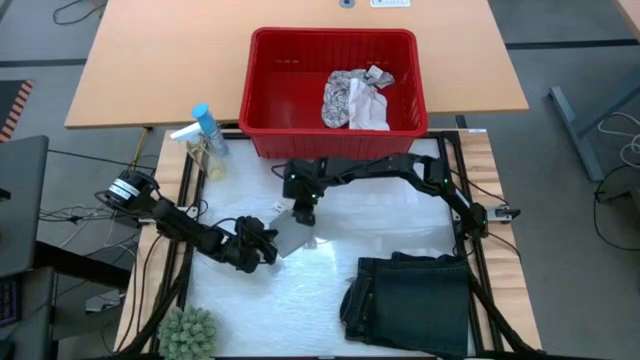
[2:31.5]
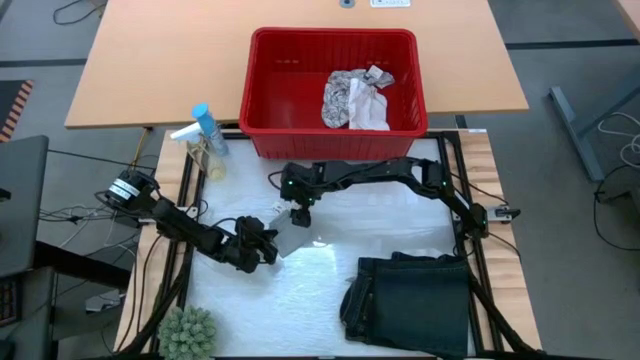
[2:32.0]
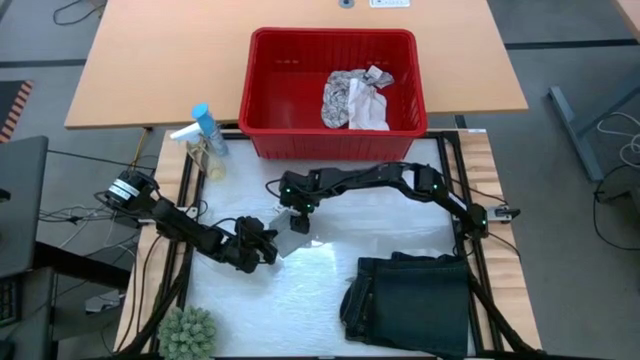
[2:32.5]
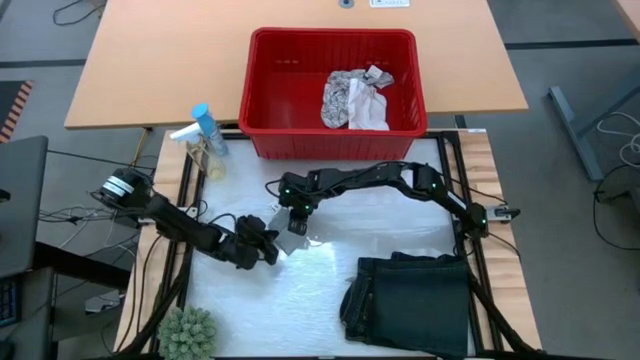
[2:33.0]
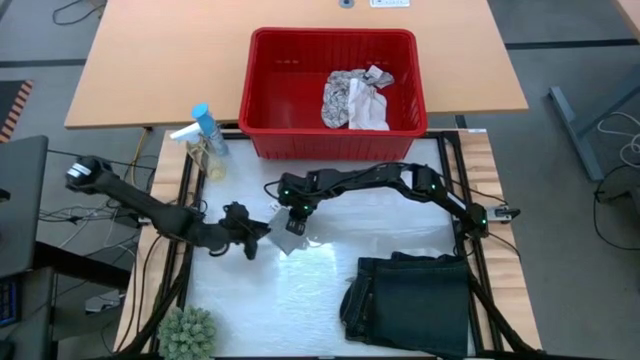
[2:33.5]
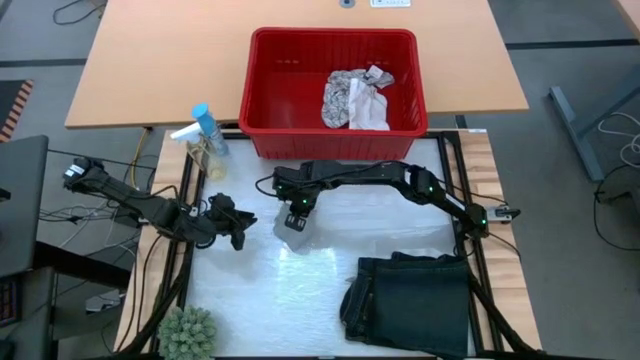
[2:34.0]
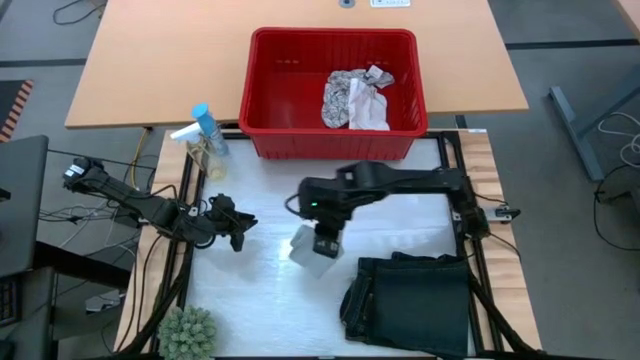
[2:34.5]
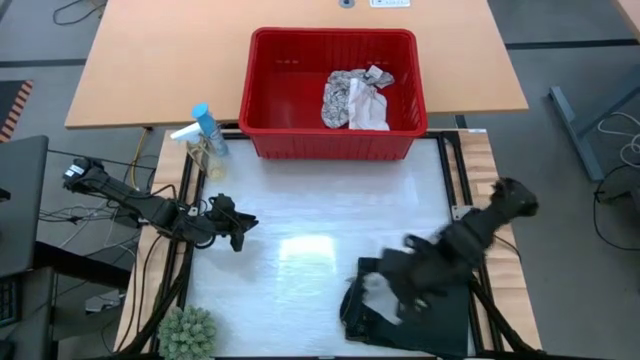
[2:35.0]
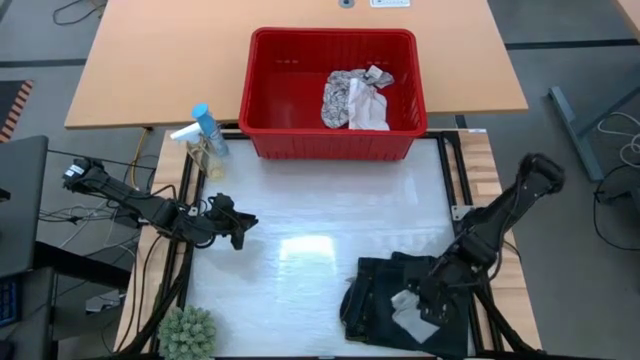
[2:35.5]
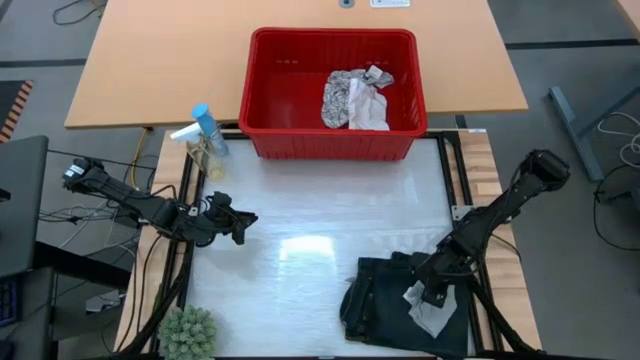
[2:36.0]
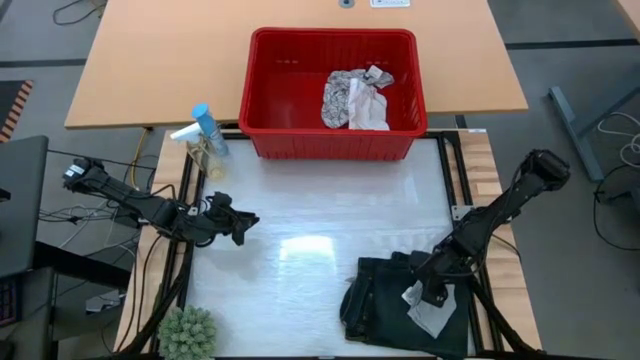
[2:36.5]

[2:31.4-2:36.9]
Task: Fold Laundry from Bin
Stack the gray boxer on the blue pants

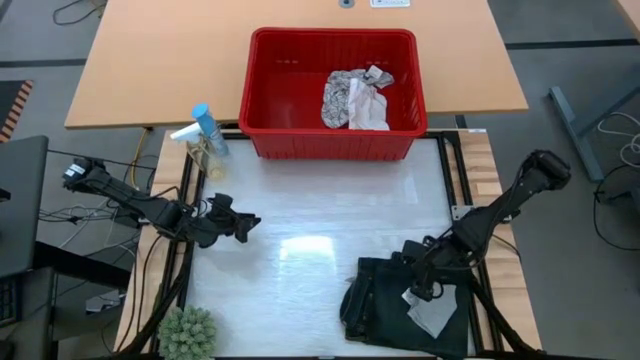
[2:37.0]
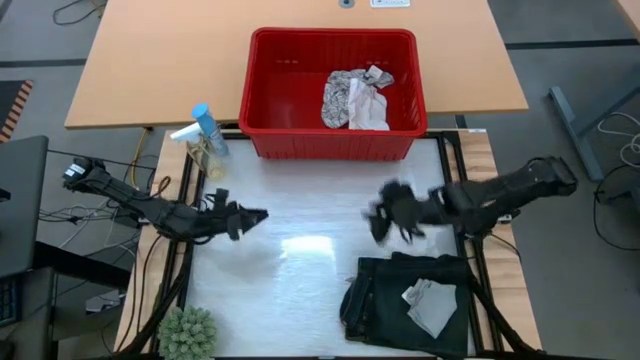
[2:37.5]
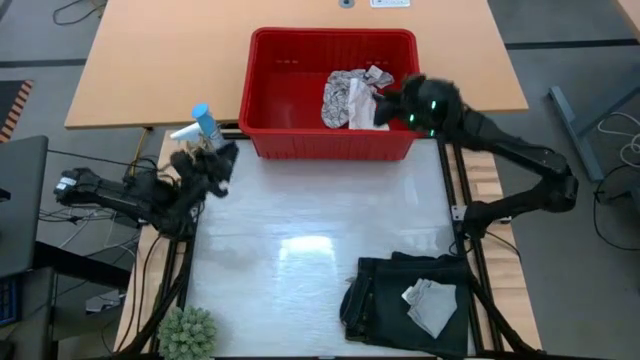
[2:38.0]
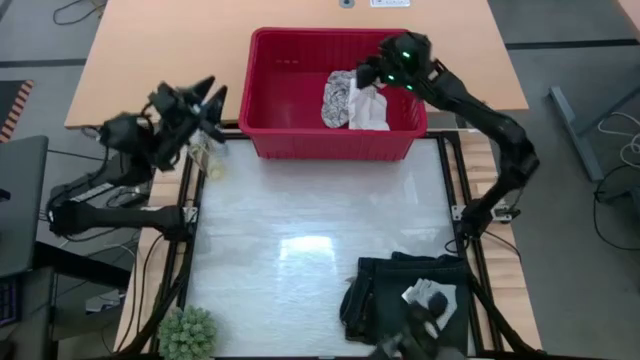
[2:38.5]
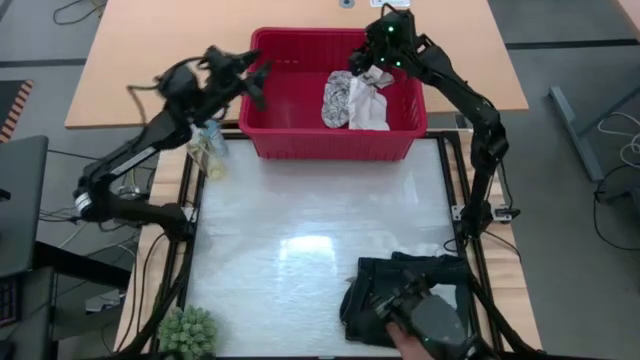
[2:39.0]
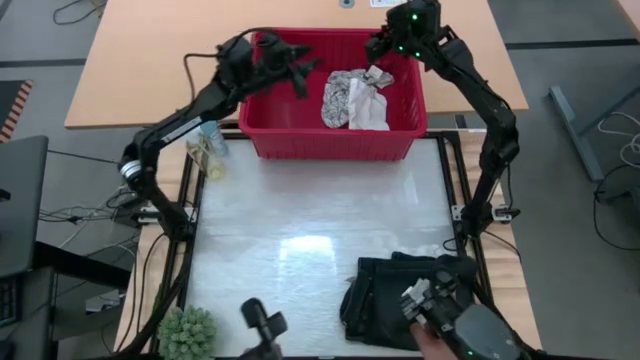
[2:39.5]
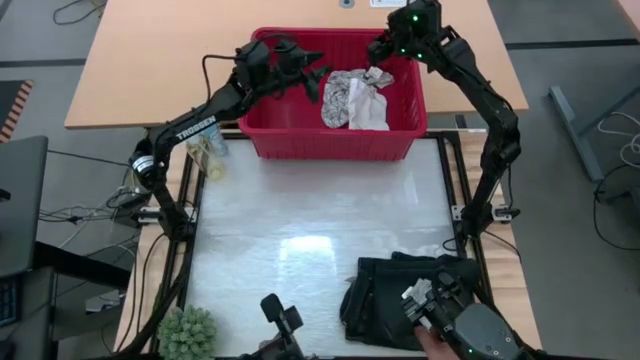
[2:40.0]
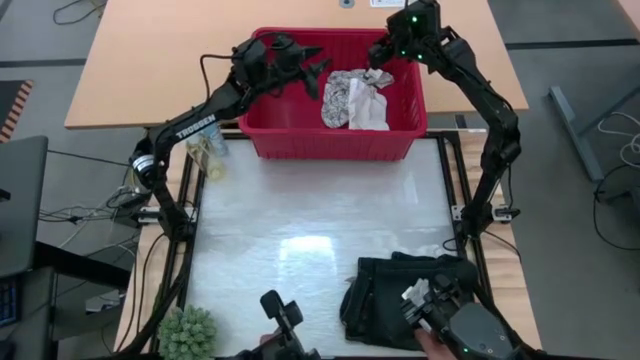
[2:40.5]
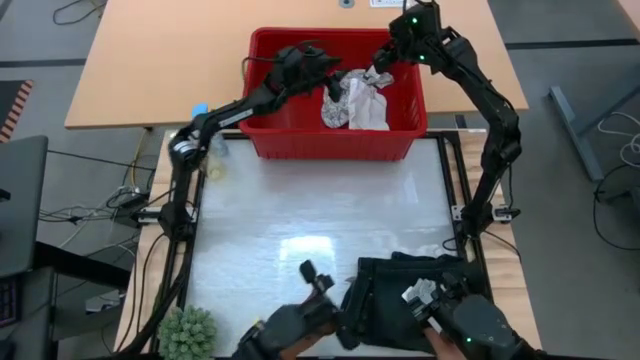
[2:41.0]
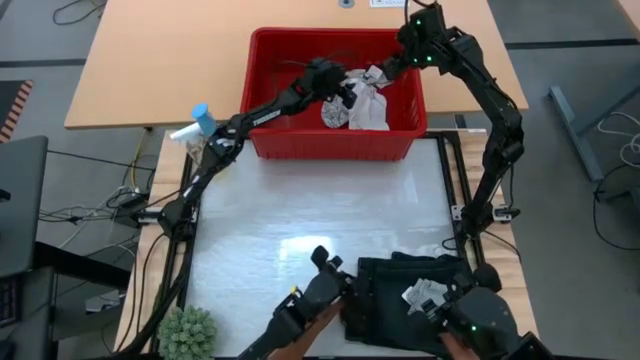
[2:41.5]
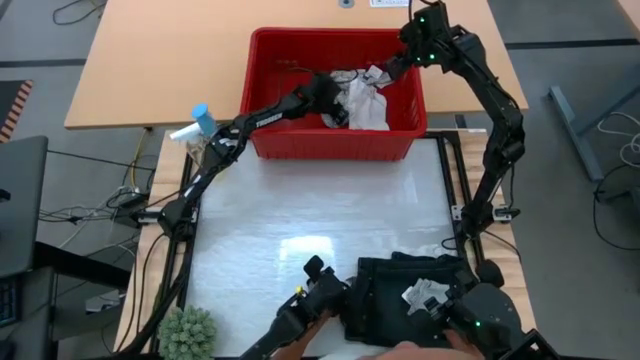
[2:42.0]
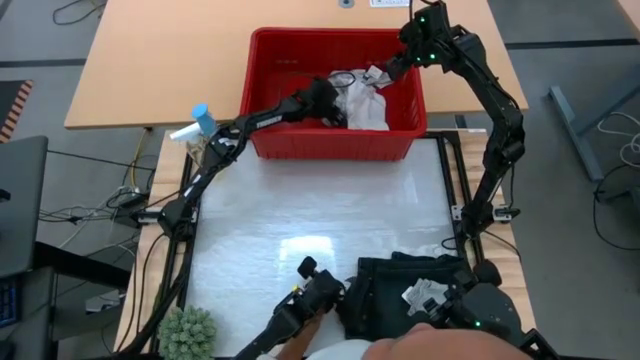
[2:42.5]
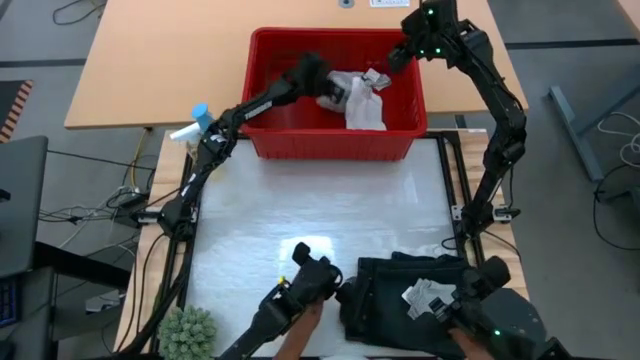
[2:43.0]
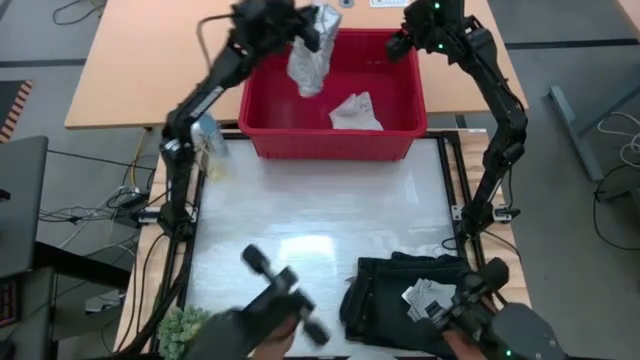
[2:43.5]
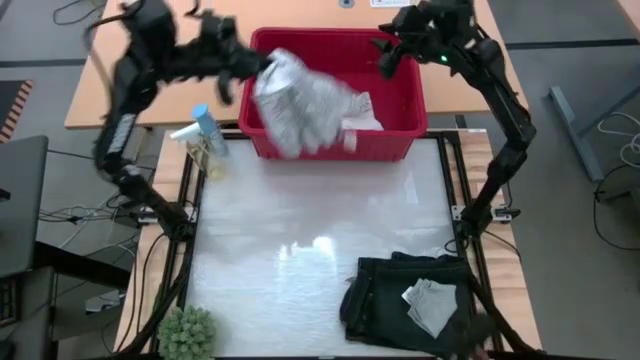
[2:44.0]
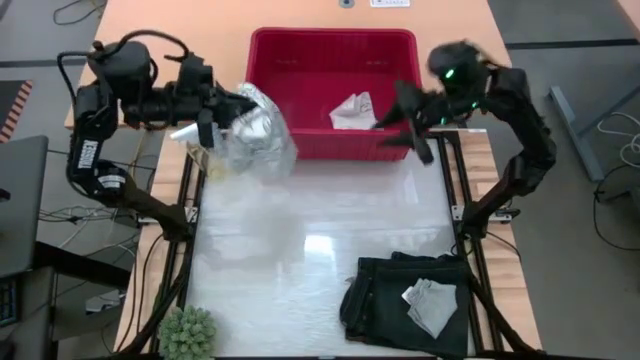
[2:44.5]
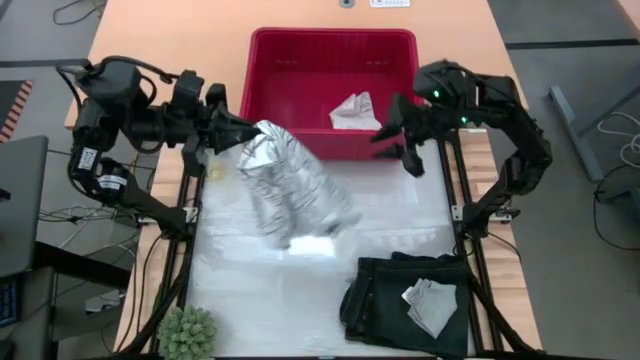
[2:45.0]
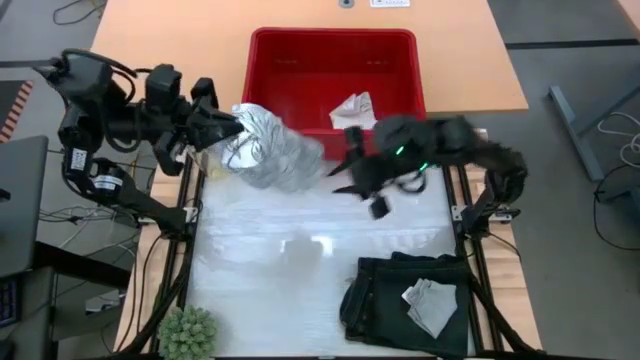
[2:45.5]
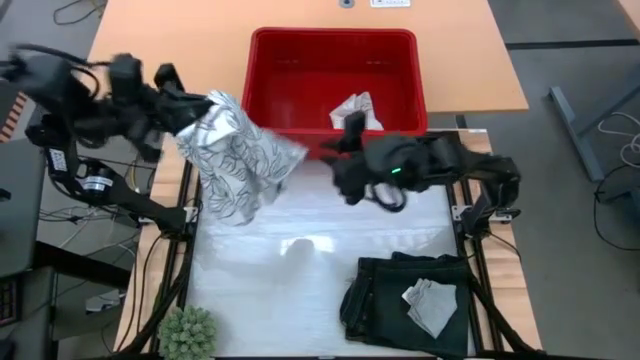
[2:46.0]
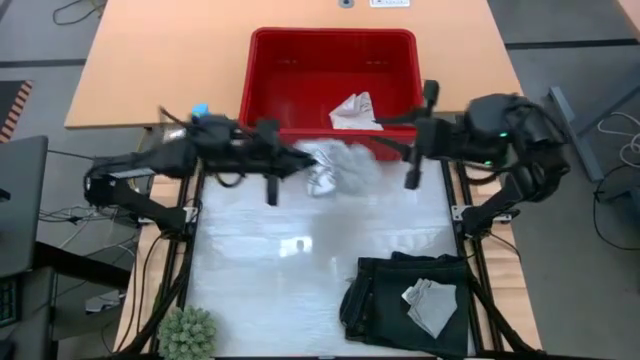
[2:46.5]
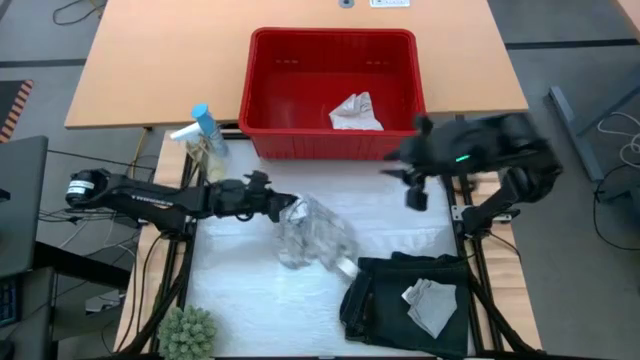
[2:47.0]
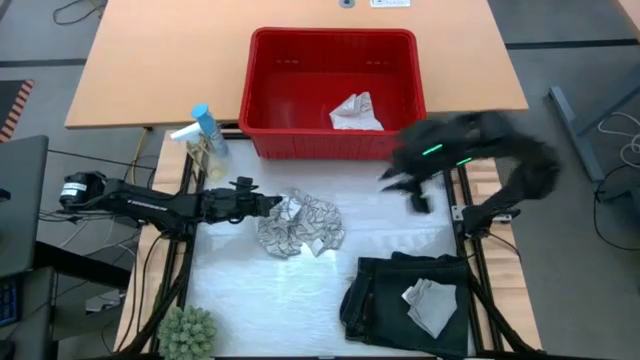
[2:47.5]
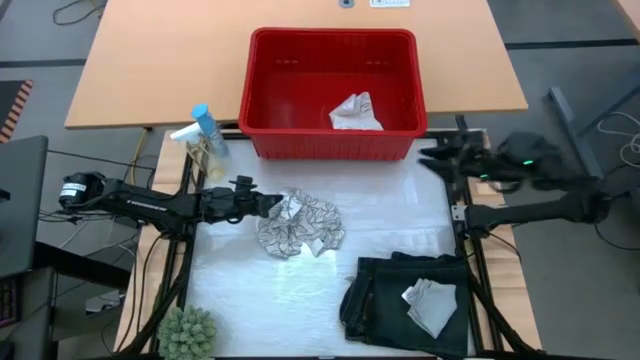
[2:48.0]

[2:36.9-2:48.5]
Remove the white from the red laundry bin

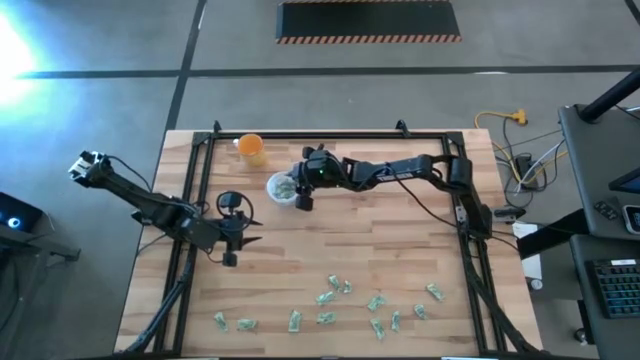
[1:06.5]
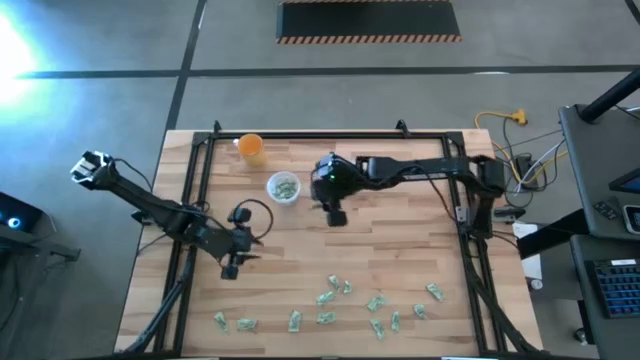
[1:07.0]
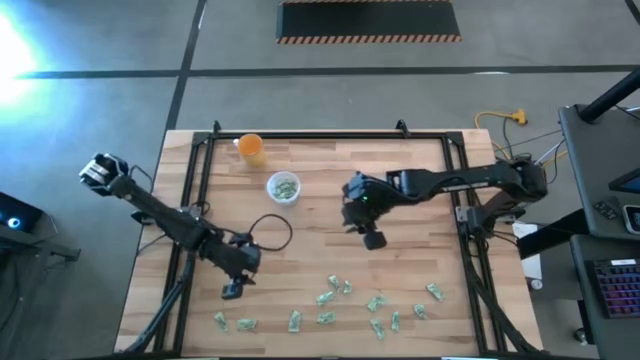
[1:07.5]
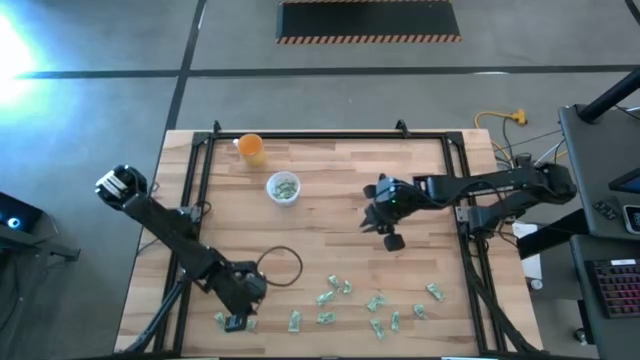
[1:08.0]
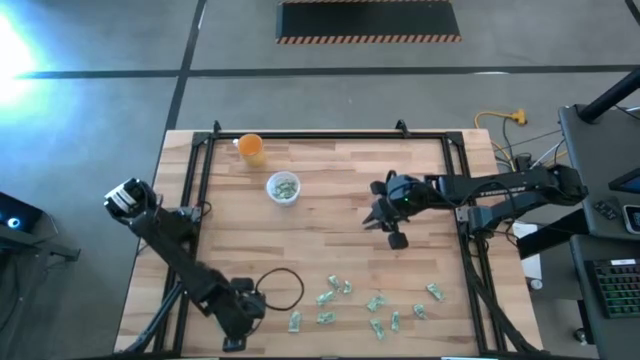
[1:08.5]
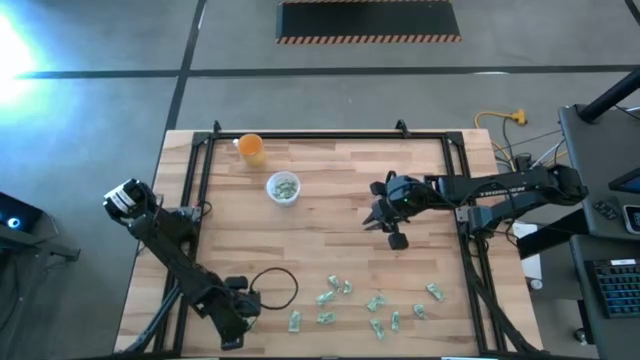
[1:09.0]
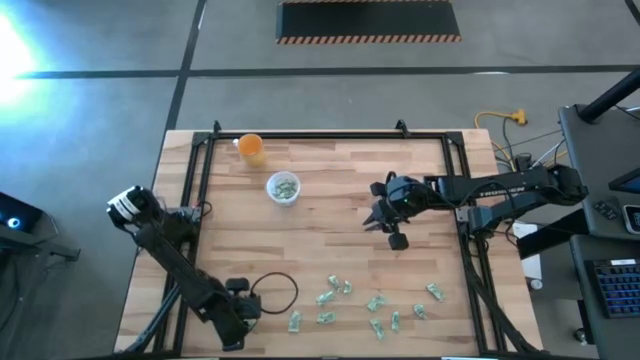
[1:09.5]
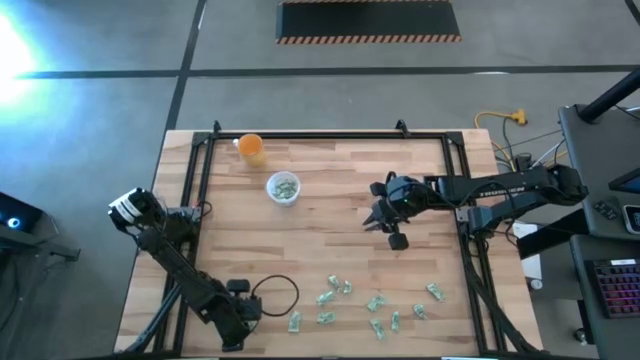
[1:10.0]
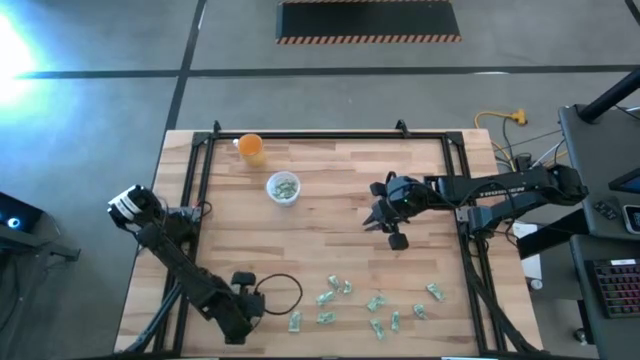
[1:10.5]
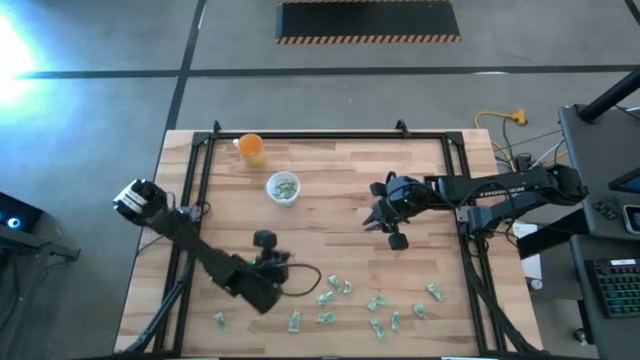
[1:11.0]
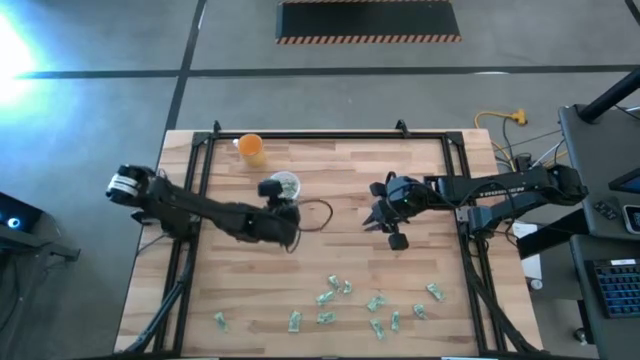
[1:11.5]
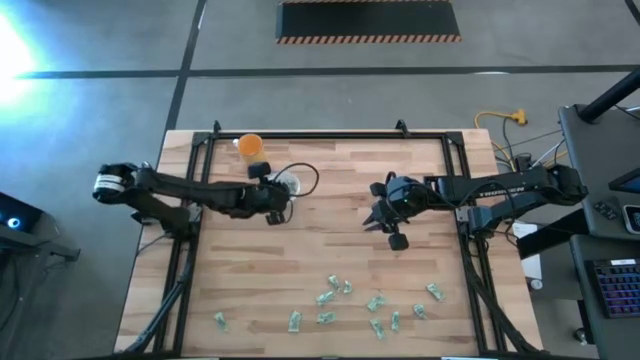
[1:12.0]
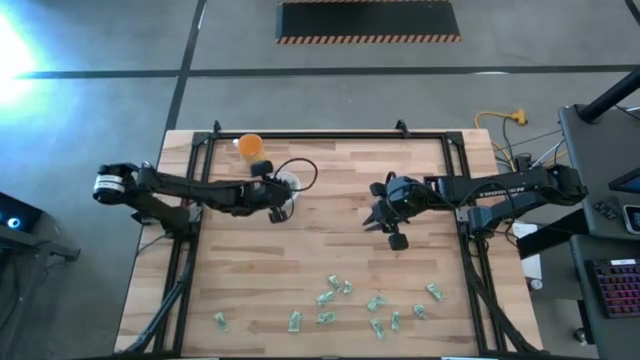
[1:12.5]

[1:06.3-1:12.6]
Task: Pick and place Stevia / Truvia into bins
Put the stevia packet into the transparent container
